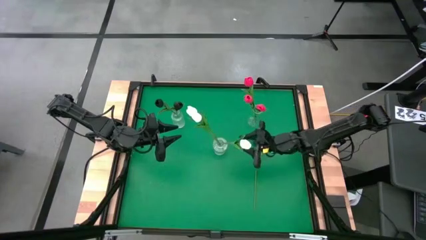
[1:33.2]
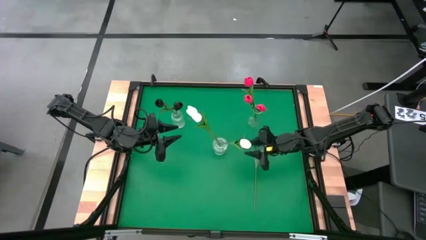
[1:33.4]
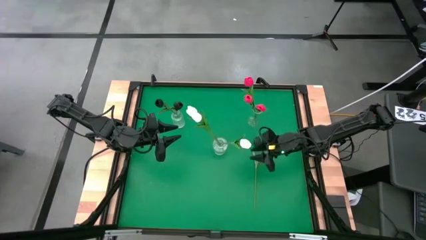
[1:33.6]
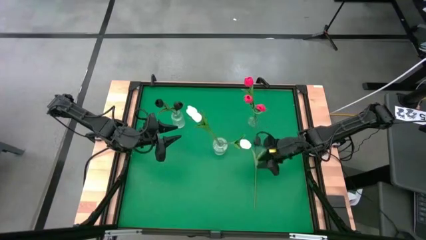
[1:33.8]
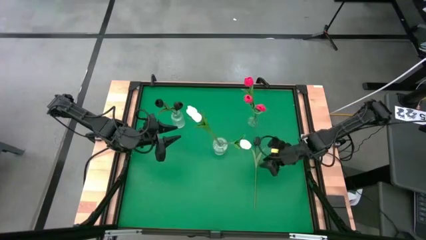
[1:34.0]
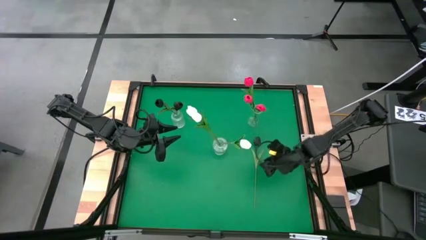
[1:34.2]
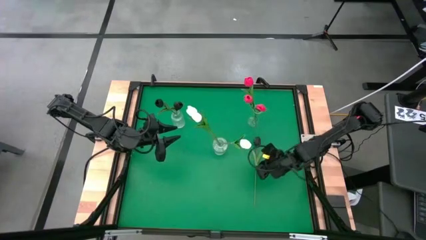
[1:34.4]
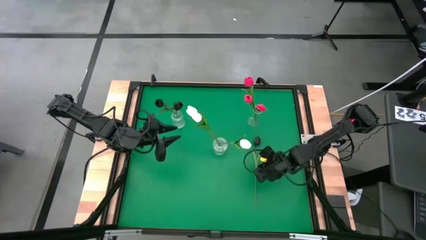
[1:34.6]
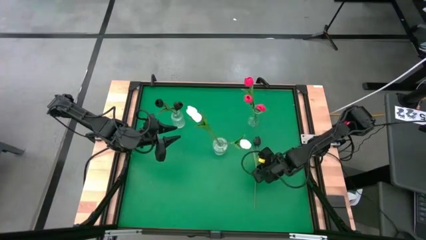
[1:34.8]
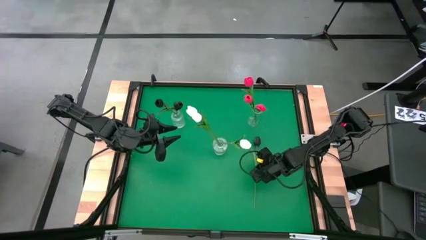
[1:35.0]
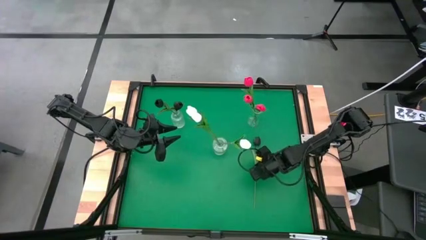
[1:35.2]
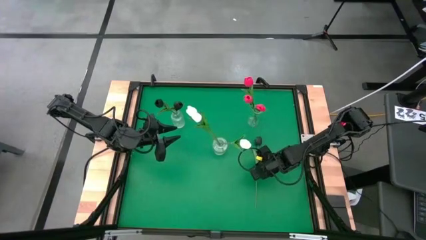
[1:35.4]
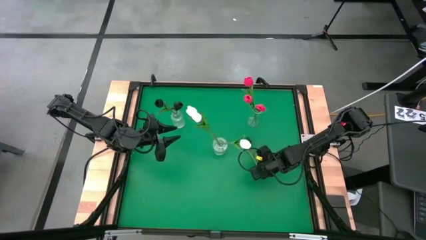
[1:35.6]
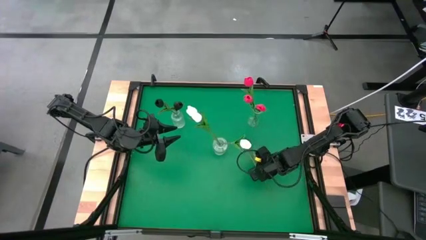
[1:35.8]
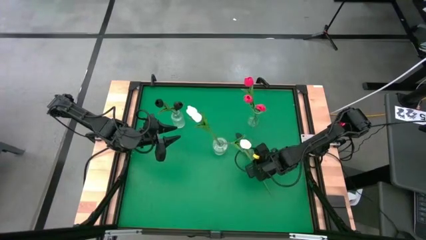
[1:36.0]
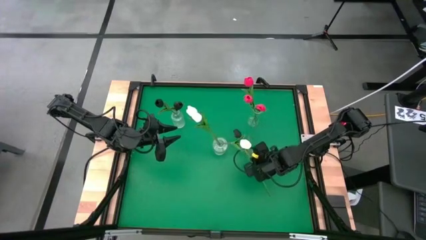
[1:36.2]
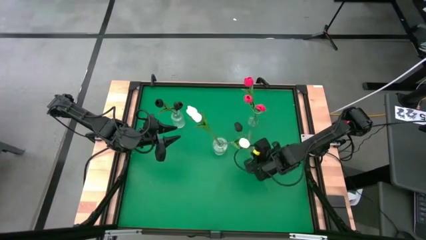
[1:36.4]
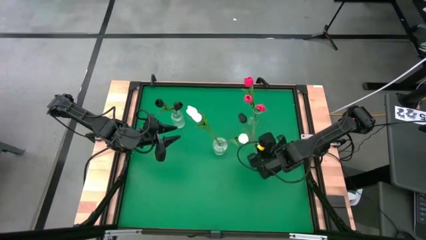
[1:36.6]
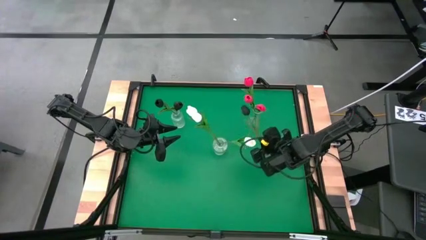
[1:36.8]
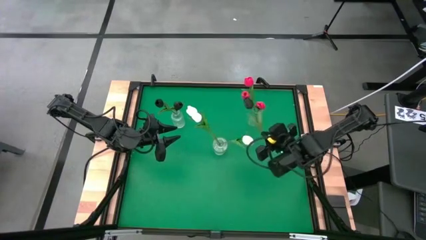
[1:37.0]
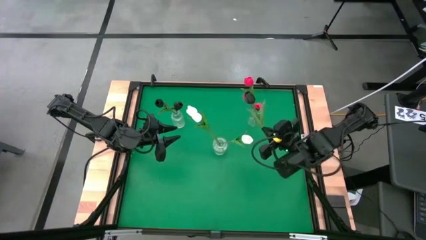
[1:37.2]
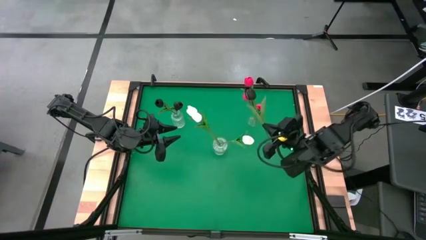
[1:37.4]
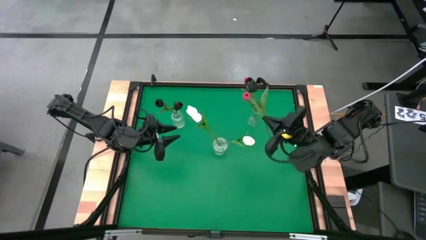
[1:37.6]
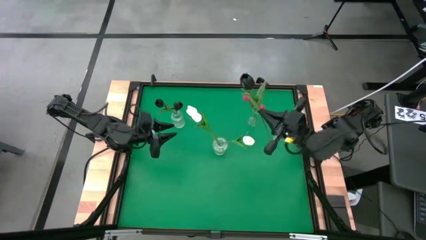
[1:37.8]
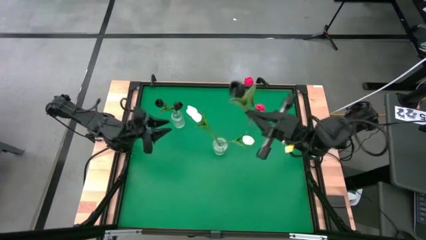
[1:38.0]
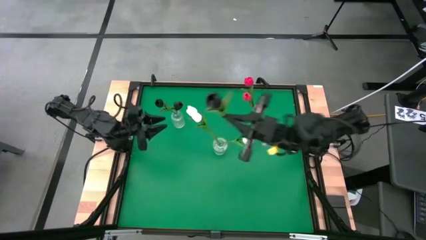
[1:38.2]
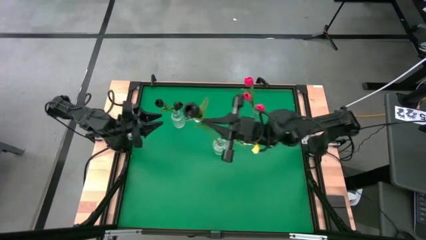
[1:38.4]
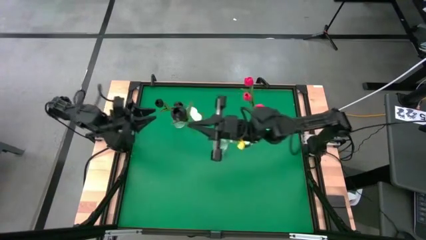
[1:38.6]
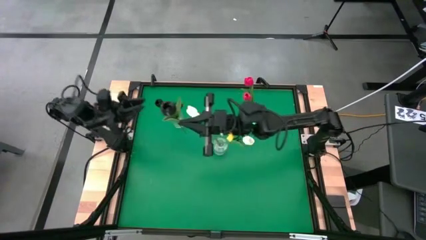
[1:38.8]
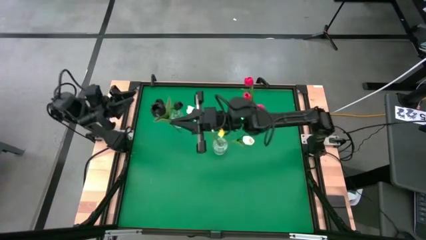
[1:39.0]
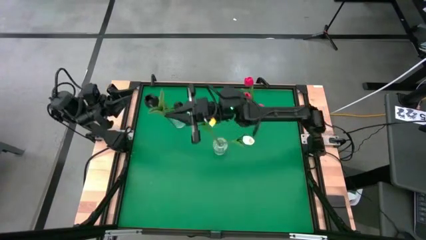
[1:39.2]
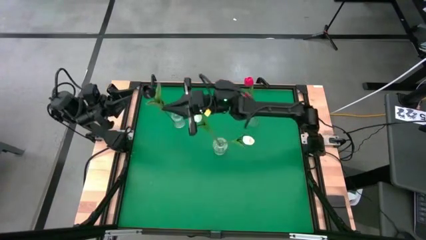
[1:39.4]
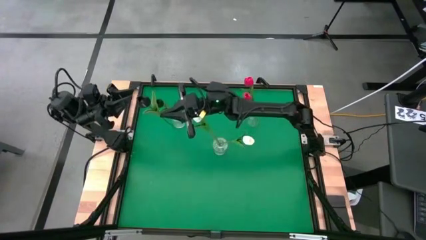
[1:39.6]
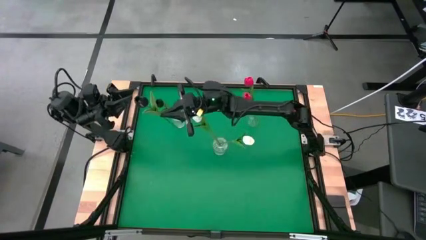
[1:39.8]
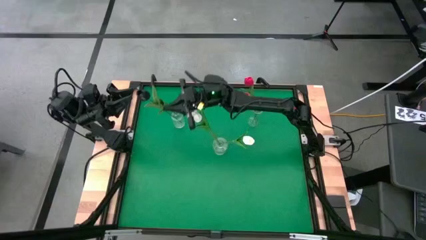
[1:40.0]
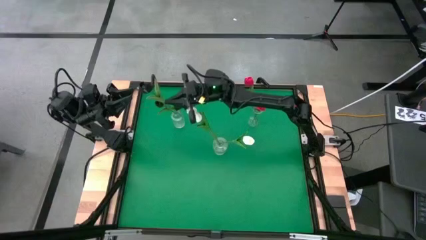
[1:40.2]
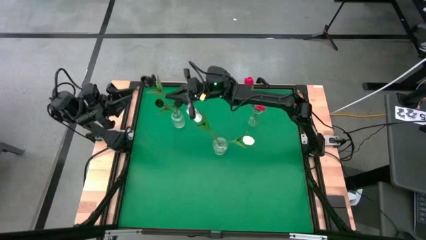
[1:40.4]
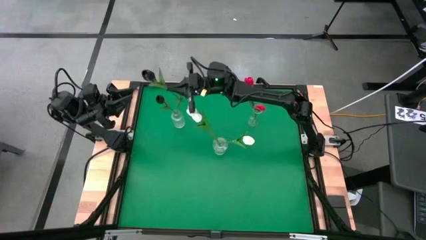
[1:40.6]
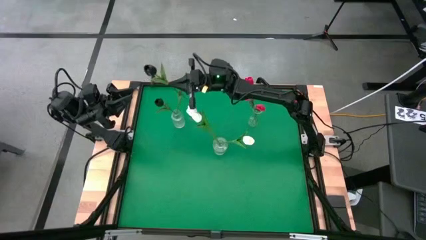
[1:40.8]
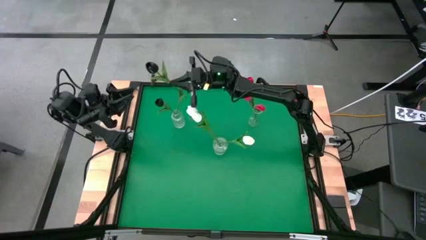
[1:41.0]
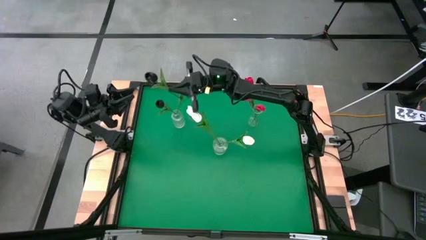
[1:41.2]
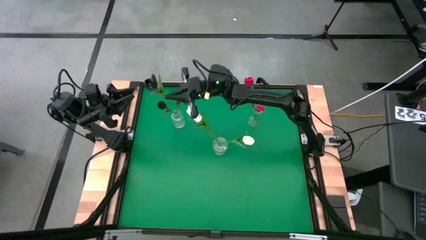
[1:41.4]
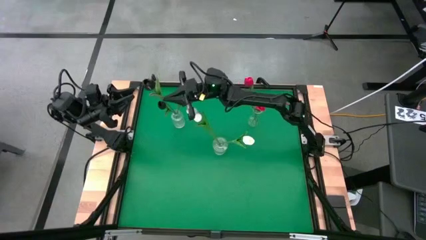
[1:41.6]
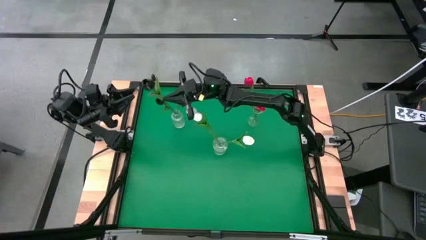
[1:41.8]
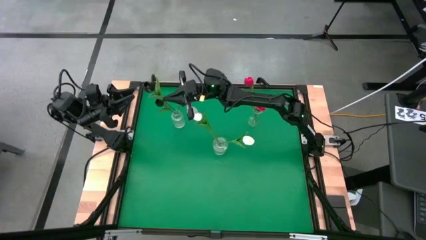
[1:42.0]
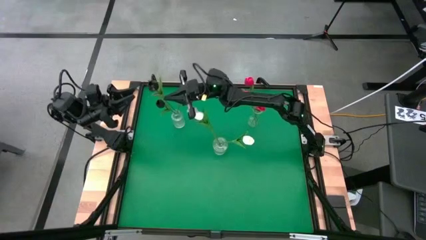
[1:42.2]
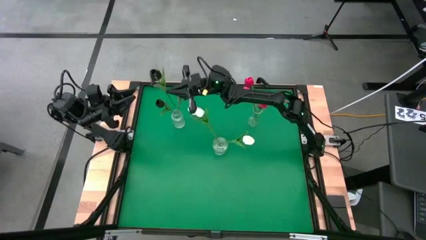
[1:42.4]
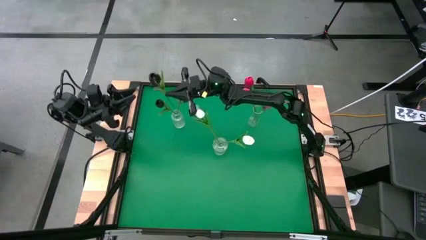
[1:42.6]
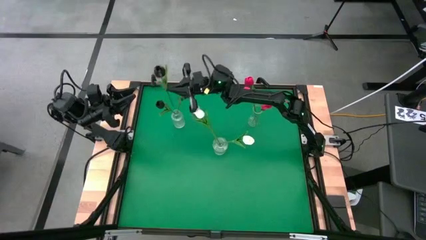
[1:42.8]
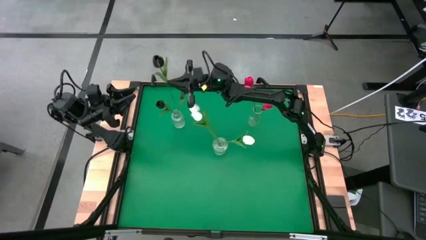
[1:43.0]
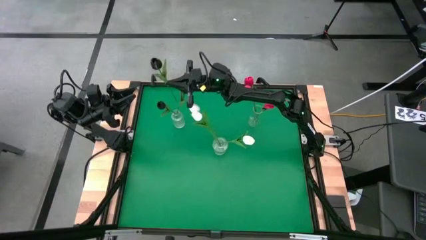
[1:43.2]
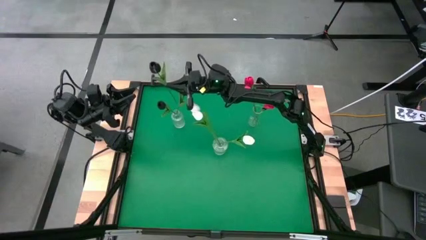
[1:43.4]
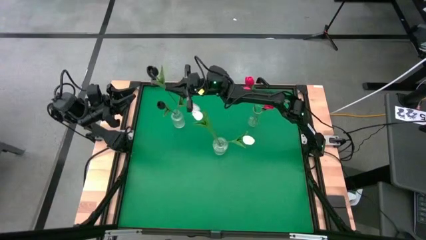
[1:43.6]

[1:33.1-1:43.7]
Task: Sort flowers into vase by color
Put the black tulip into the left transparent vase

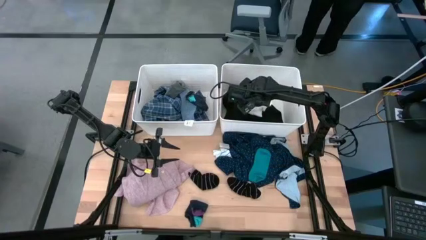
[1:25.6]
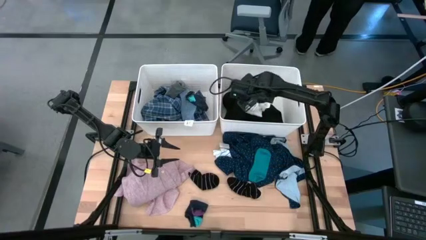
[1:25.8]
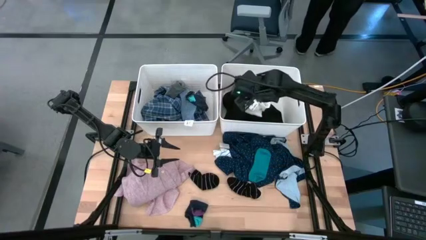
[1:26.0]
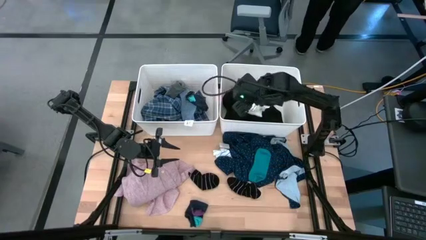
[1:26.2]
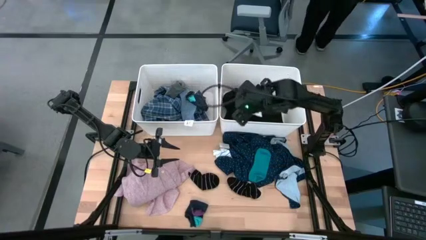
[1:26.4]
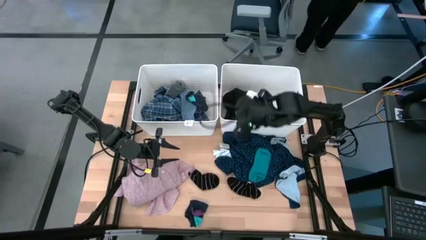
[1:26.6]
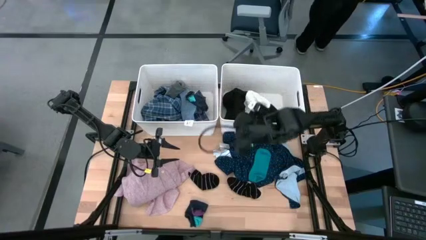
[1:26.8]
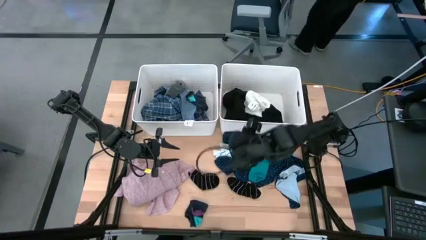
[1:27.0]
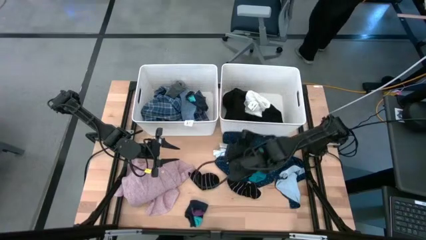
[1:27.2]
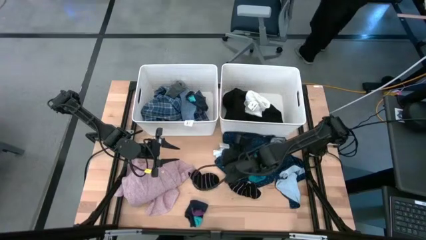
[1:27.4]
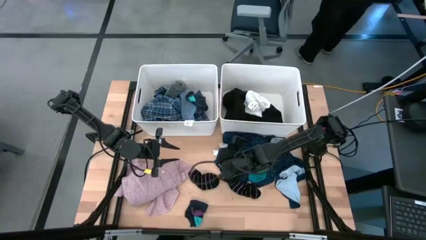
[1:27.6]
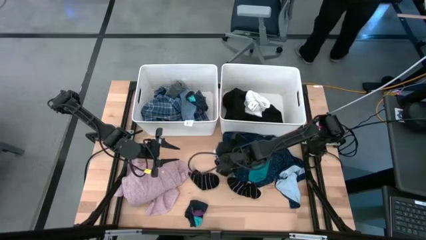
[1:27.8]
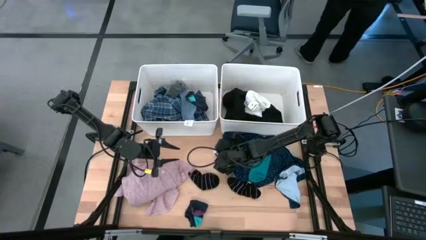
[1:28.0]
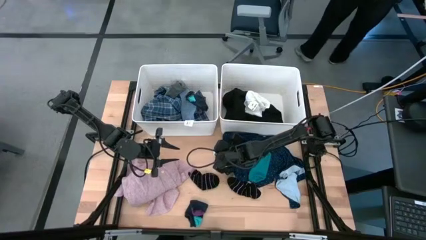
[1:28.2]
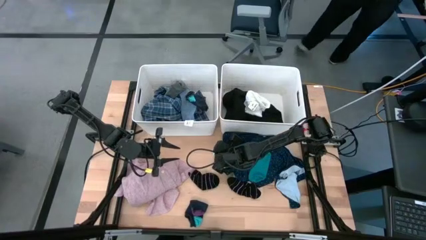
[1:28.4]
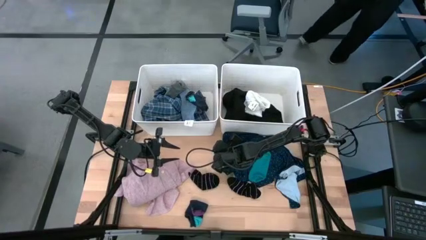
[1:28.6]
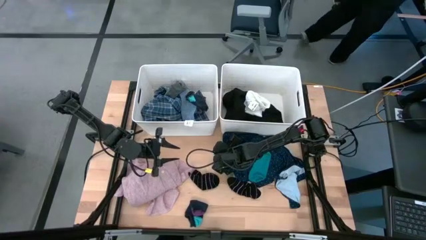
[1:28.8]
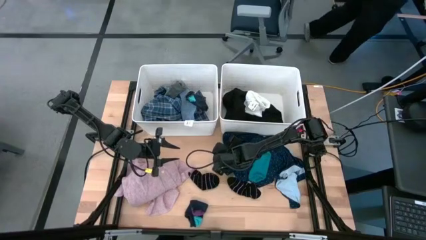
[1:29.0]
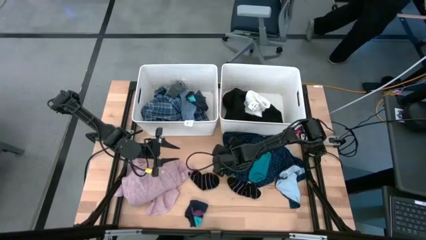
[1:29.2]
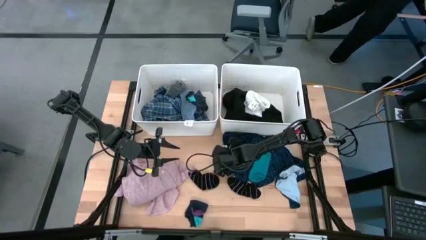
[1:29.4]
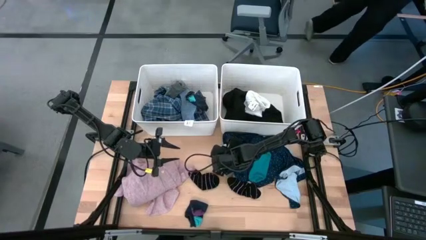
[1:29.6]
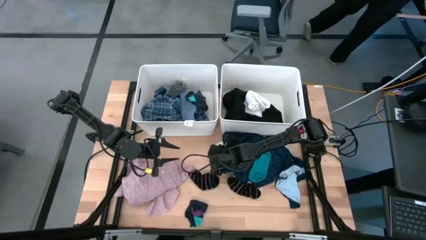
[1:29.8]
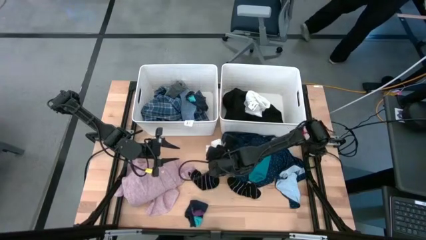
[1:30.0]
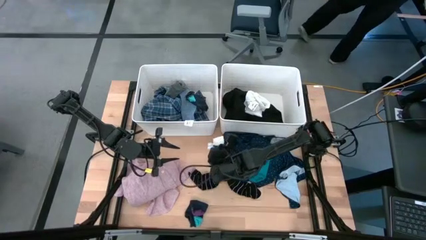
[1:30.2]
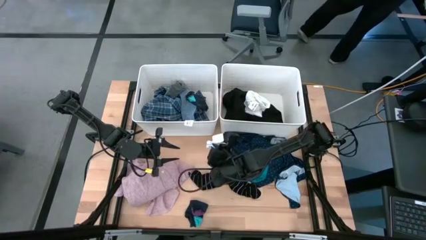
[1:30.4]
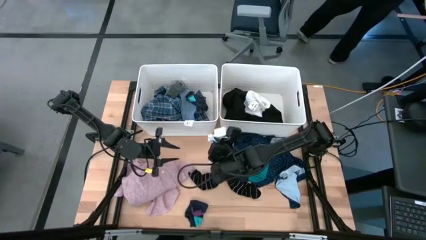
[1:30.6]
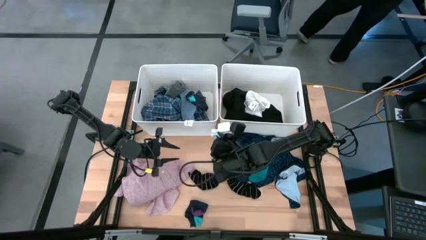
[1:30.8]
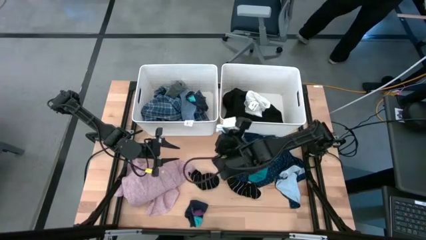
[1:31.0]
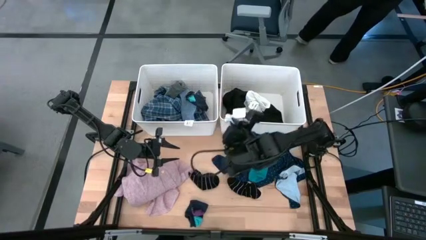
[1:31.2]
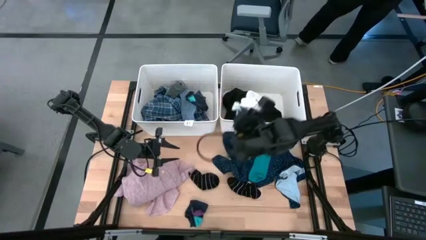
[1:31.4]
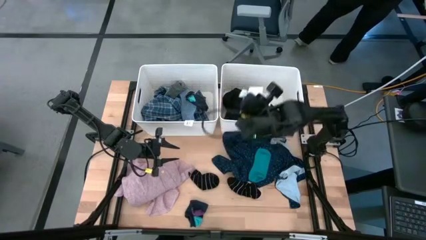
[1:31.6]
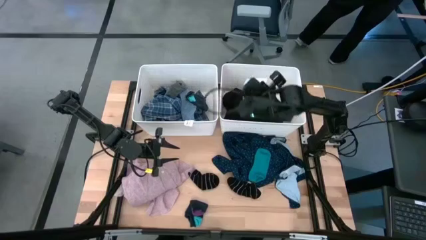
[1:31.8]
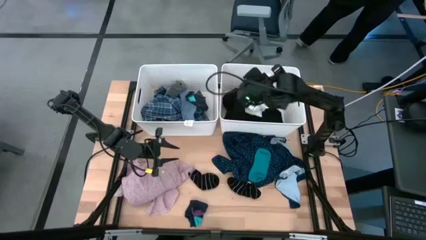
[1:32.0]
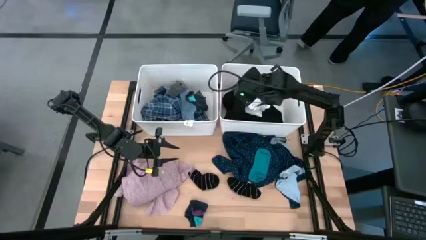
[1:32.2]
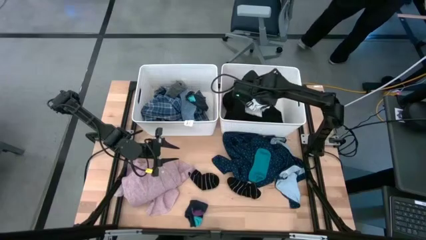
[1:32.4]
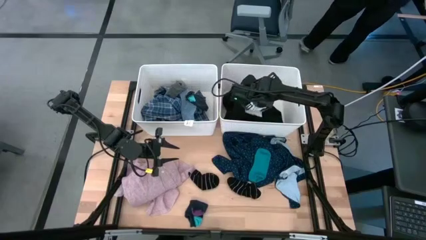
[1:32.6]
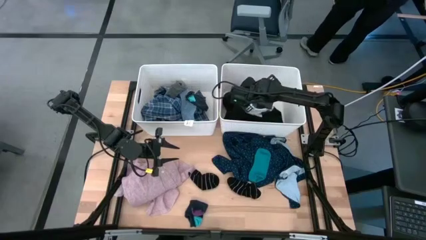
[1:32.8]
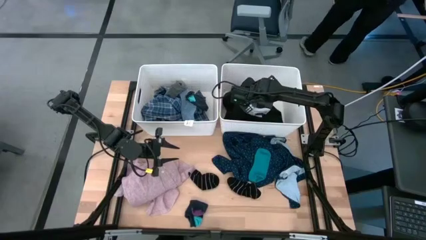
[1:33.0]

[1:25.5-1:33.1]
Task: Sort clothes
Put the white blue sock into the right white bin
